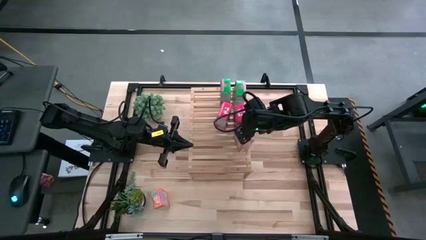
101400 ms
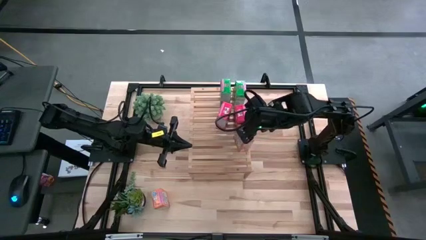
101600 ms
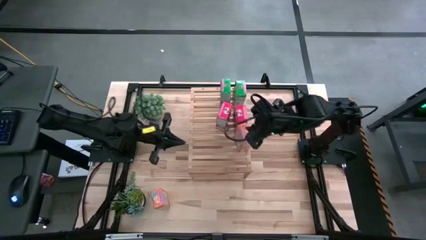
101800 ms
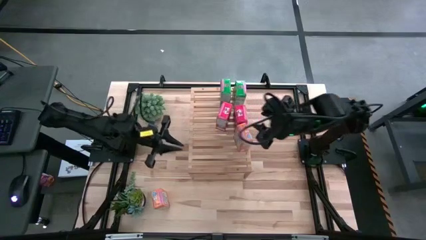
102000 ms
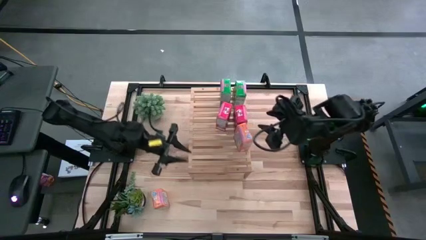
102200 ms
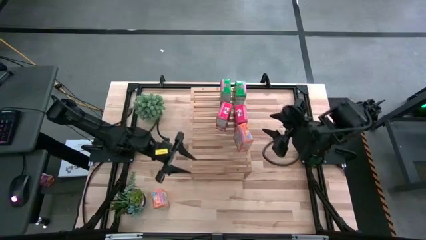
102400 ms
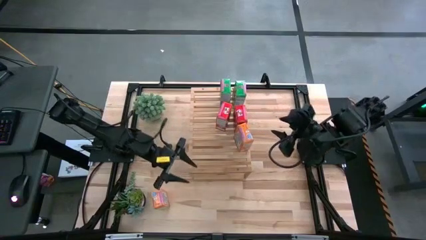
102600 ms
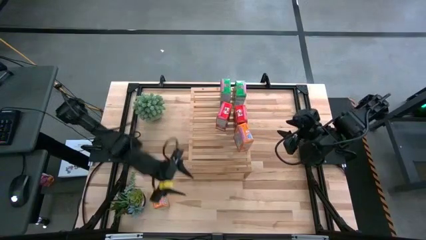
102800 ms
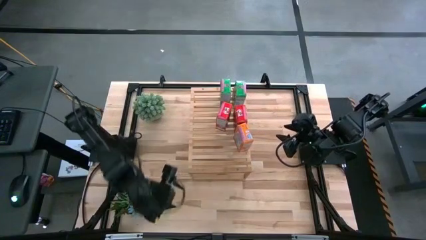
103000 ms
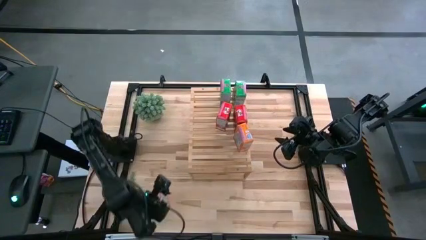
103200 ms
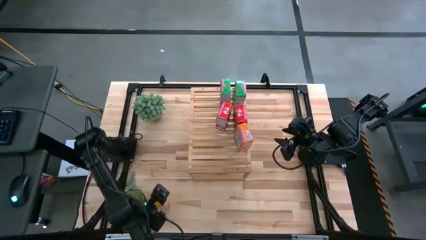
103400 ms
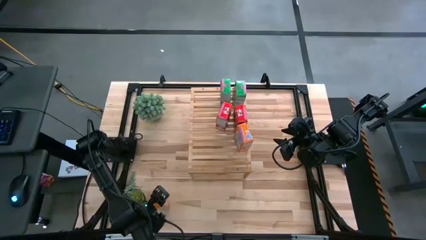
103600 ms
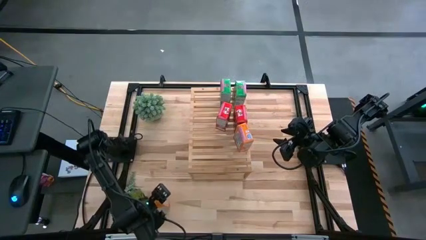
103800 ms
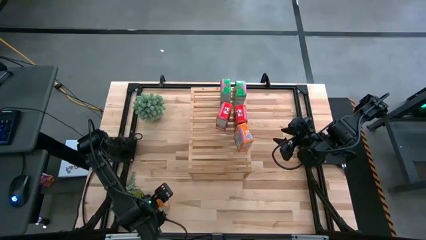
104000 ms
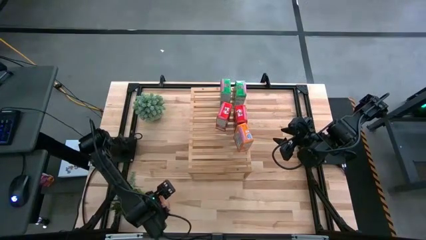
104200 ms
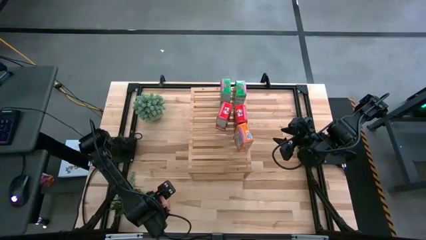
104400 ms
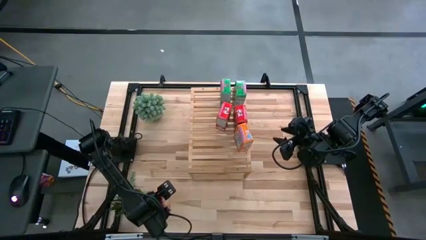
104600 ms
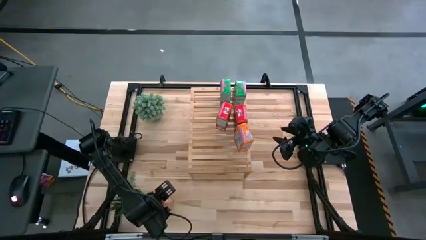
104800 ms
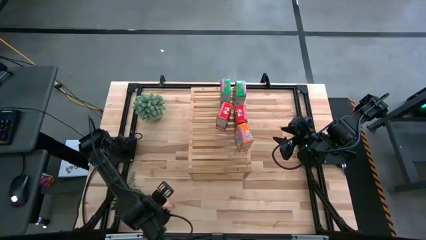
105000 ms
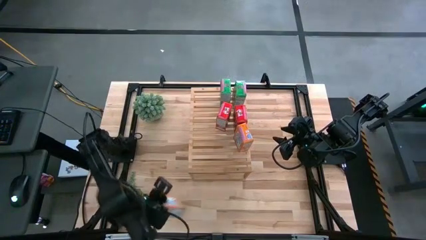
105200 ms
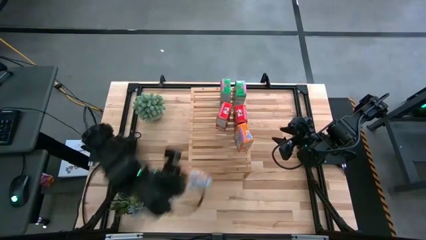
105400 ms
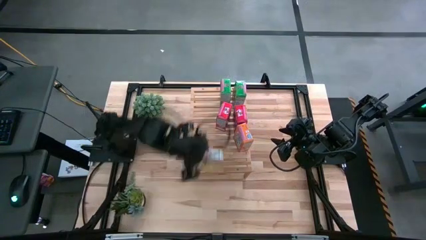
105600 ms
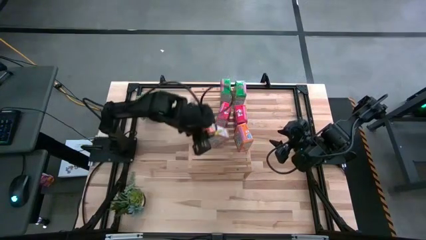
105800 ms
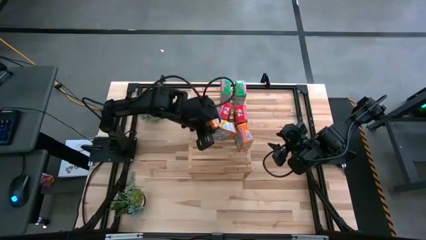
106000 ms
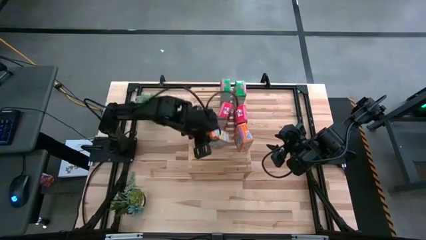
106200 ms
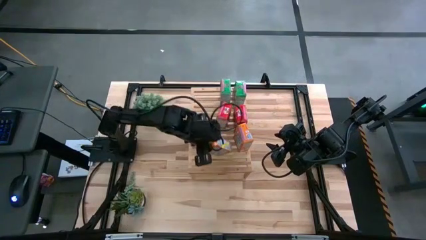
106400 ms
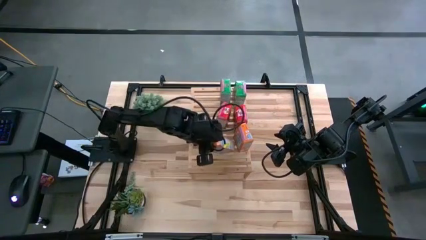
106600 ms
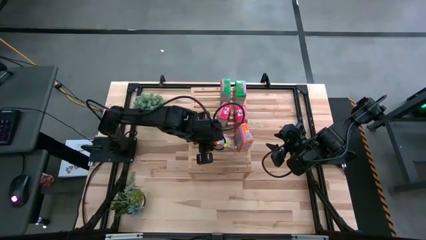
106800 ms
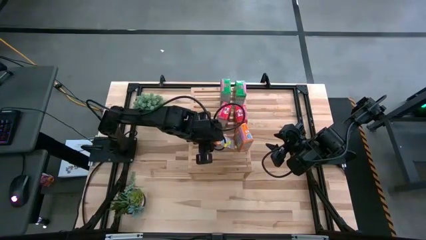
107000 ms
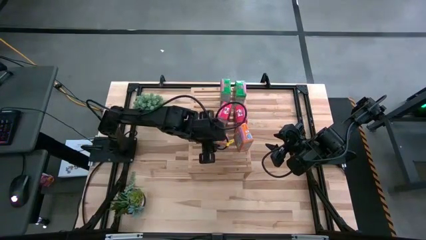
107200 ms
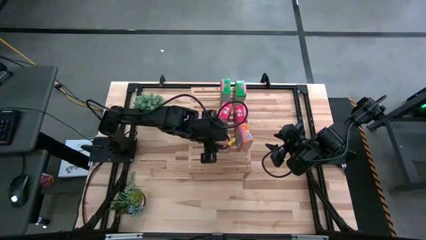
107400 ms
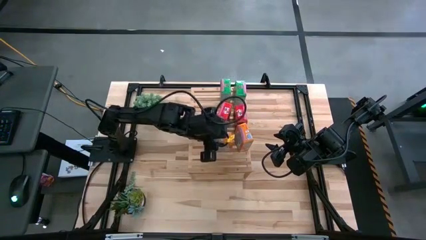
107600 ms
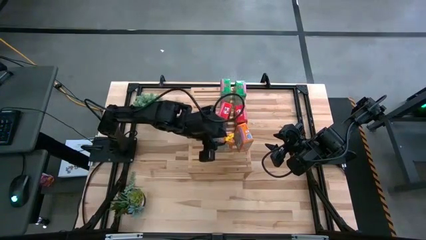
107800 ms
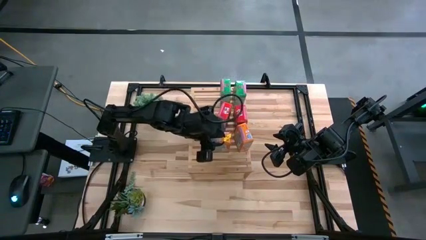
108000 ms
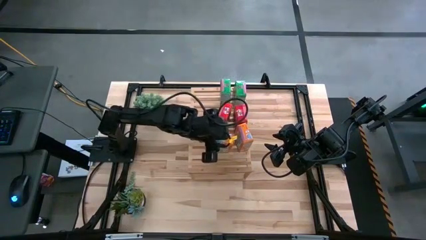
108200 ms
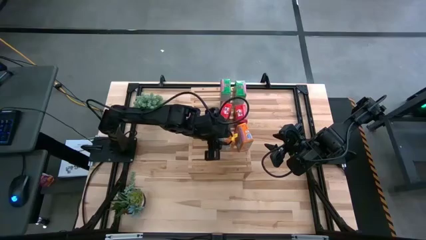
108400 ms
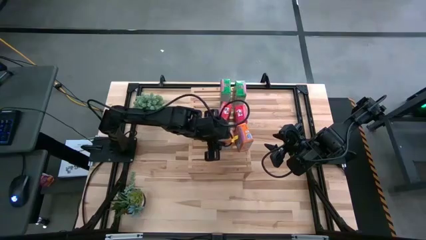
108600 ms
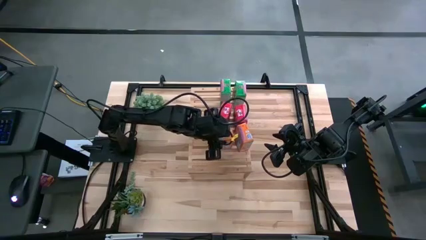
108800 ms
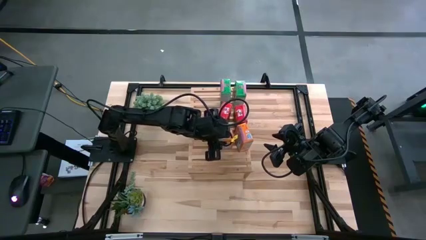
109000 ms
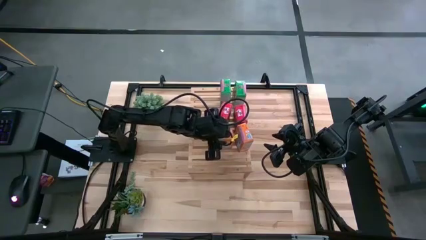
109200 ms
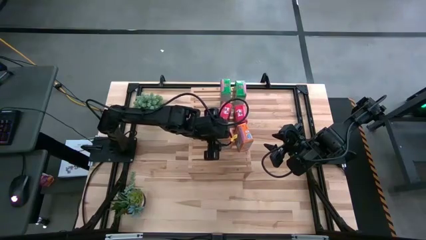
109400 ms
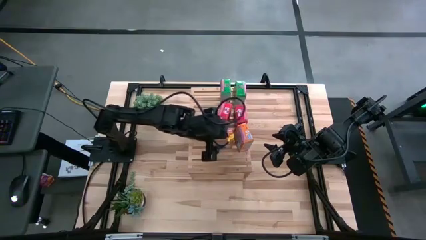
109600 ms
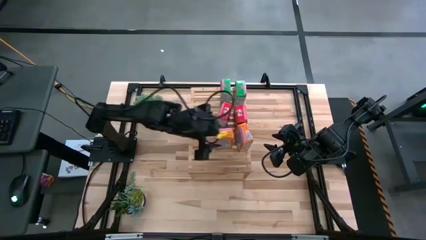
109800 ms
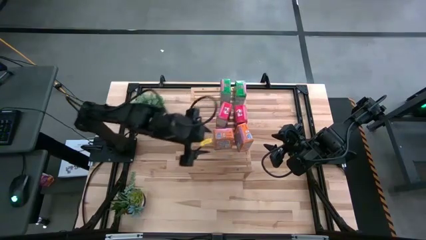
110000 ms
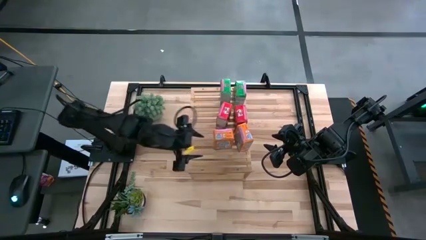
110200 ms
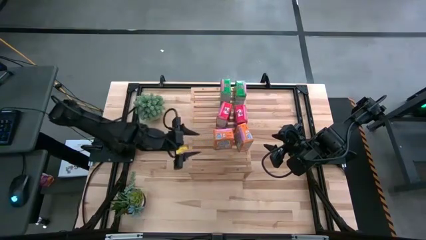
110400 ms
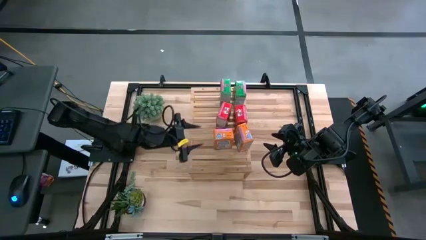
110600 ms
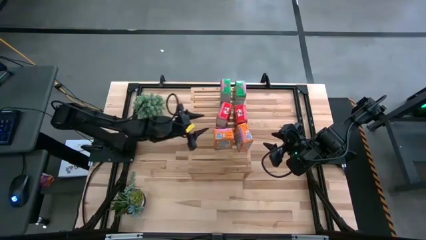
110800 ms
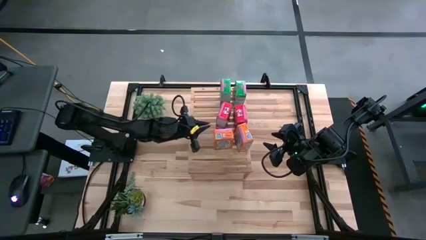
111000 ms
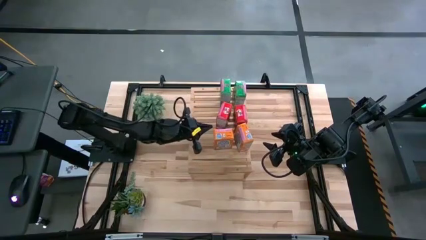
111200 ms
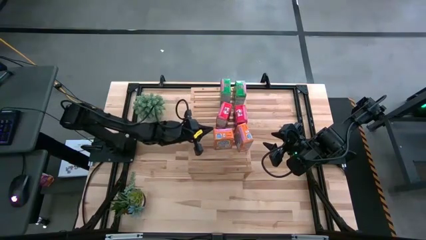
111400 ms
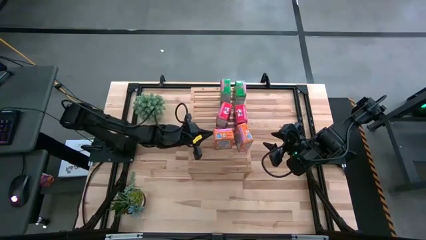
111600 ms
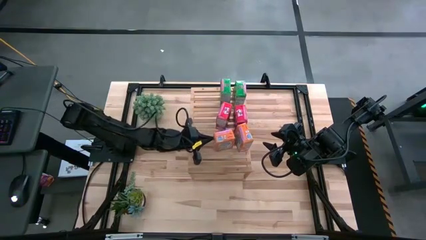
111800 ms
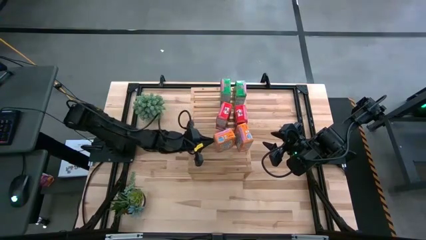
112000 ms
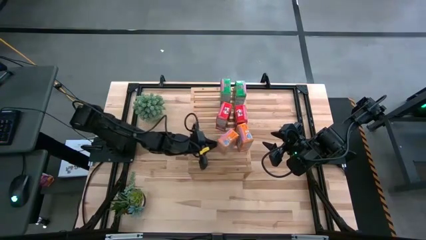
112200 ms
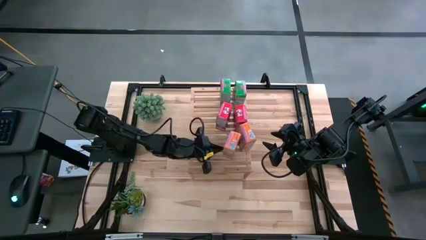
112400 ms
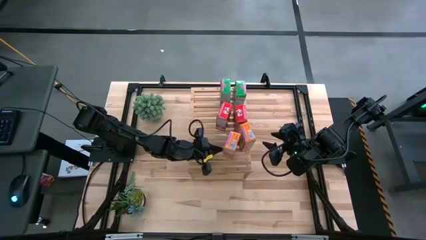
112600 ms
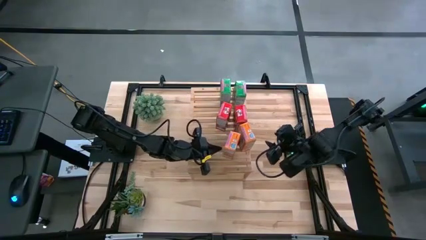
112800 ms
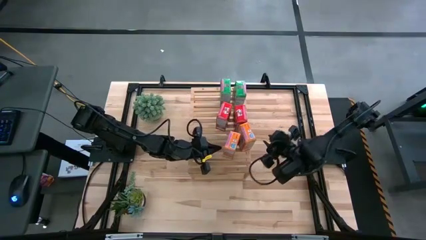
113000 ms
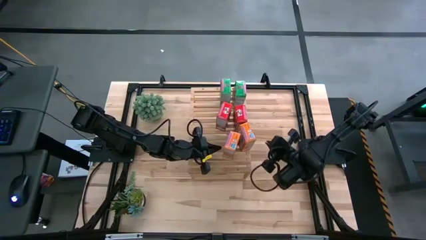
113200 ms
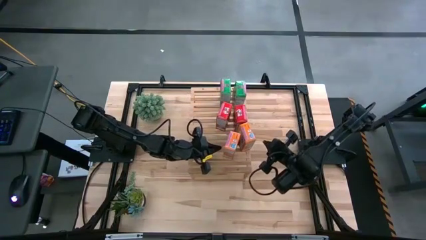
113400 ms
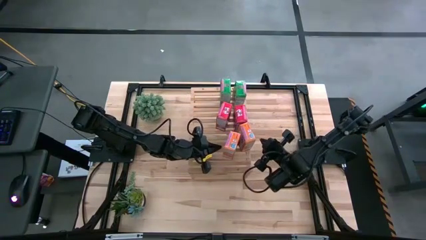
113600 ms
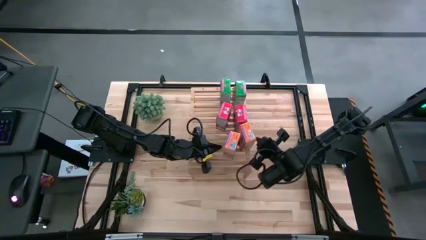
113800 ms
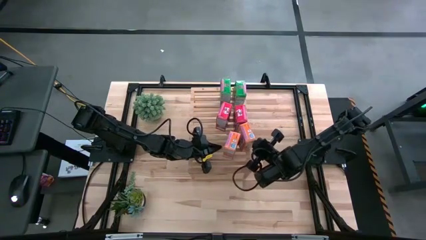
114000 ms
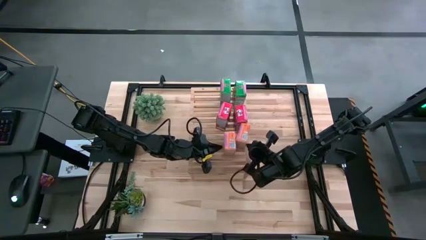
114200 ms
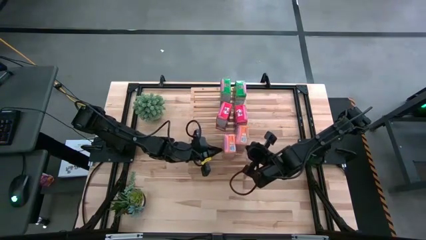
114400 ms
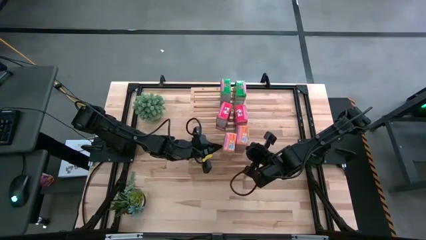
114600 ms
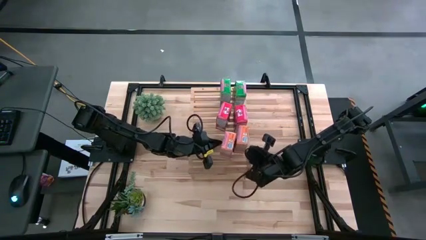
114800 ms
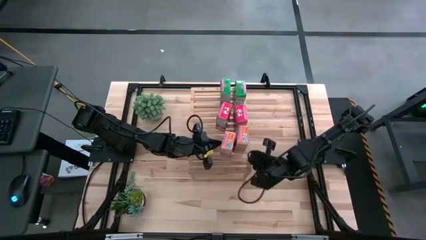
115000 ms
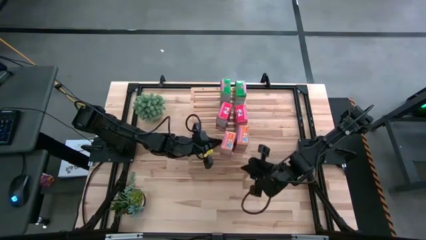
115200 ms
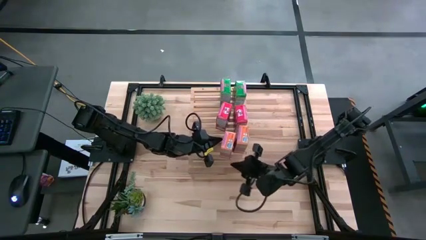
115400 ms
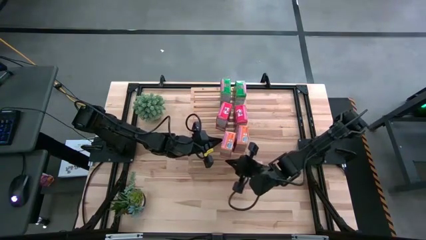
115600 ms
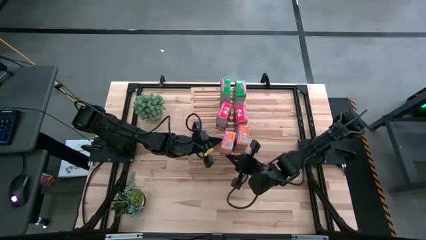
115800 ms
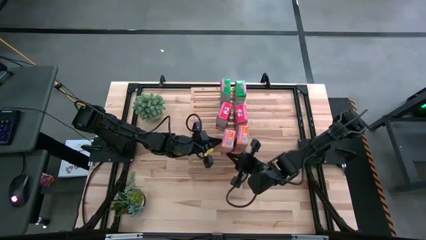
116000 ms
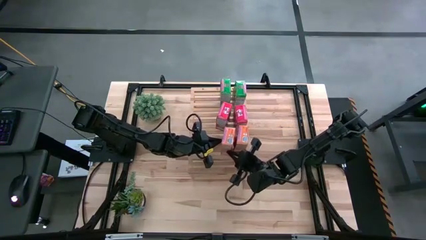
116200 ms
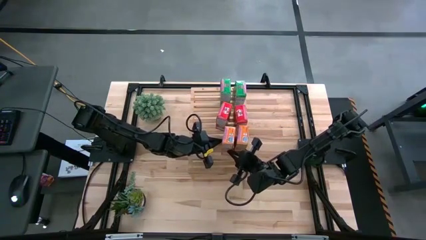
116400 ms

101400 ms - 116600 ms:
Task: Stack cereal on shelf
Put the orange cereal box on the shelf aligned with the other orange cereal box

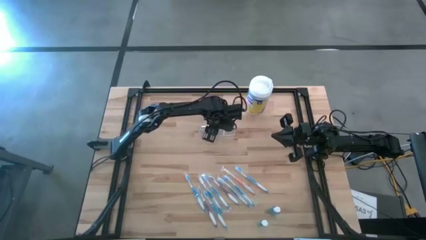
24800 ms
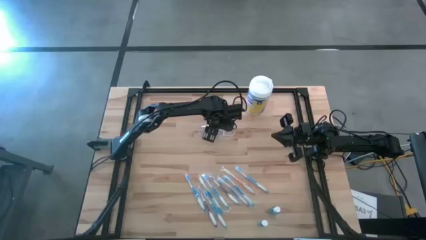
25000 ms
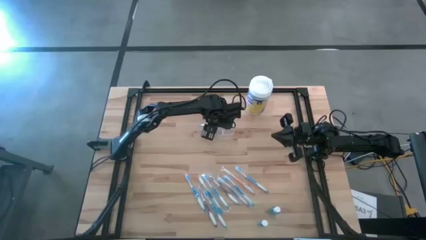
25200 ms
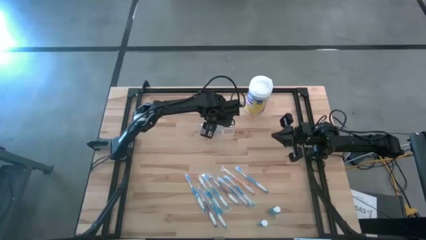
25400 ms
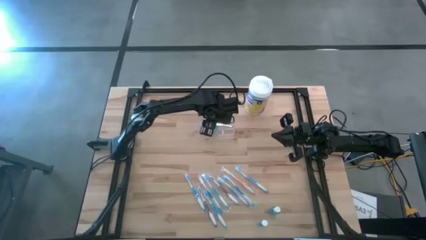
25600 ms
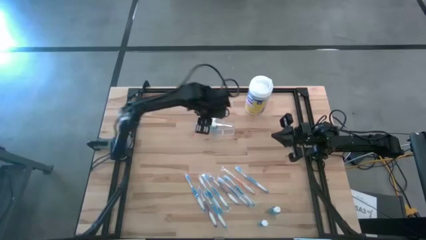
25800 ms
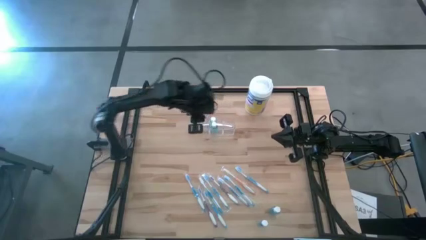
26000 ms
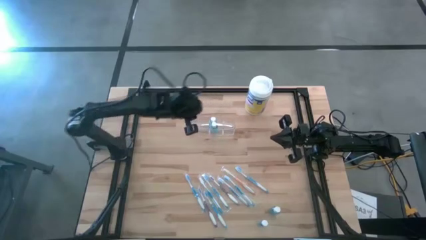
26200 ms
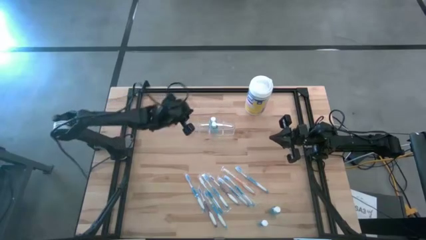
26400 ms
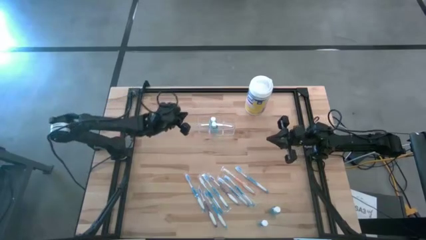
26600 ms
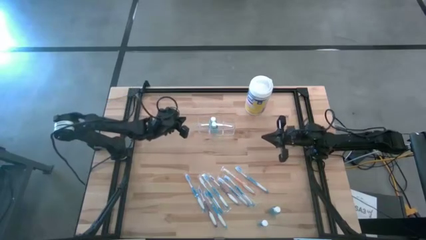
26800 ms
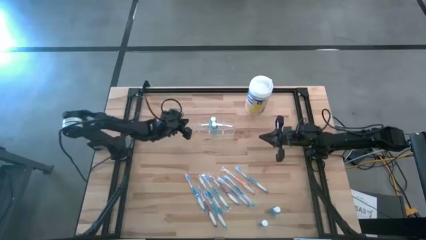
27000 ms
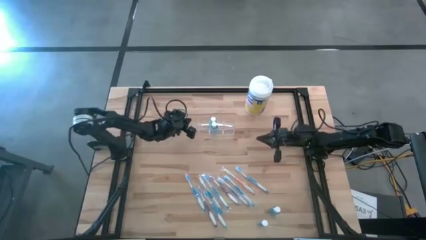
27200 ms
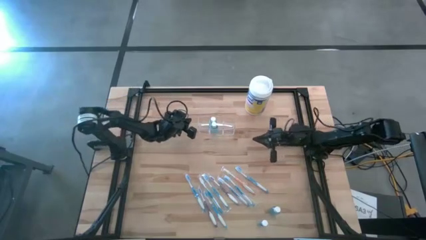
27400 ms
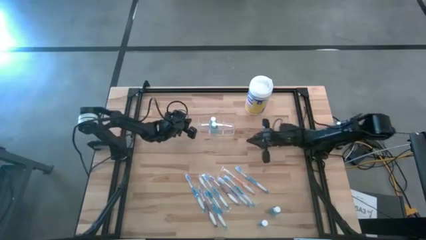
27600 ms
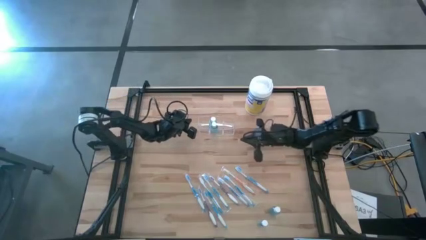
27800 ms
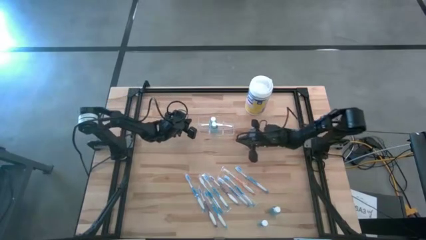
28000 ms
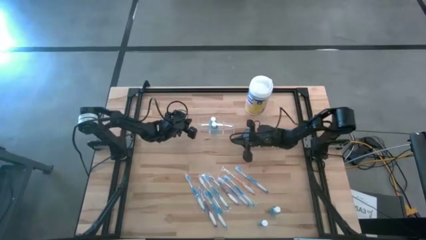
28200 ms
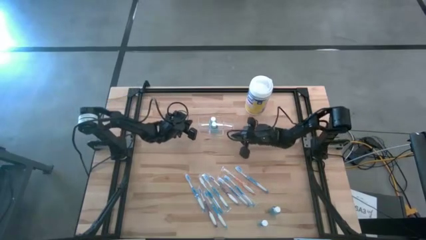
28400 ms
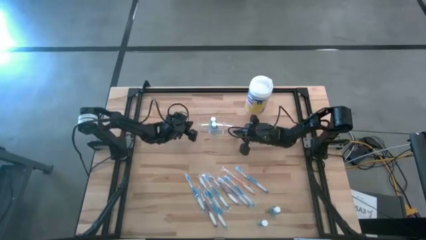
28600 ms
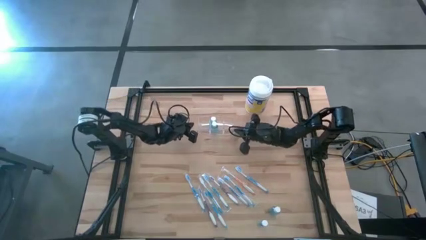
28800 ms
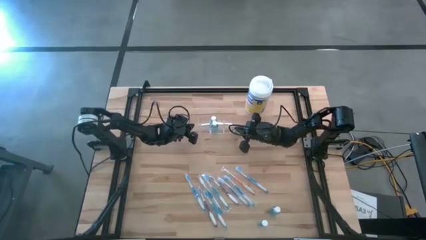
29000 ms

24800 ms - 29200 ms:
Task: Pick & Place toothbrushing station
Adjust the transparent organizer
